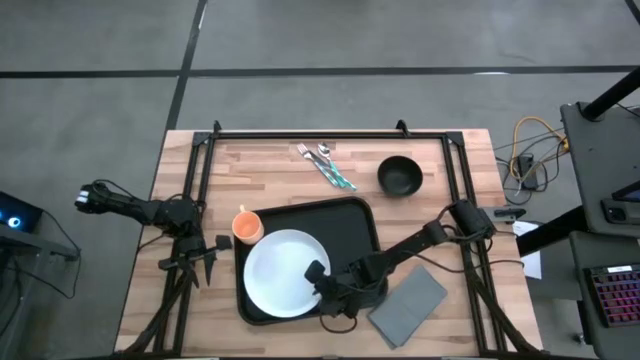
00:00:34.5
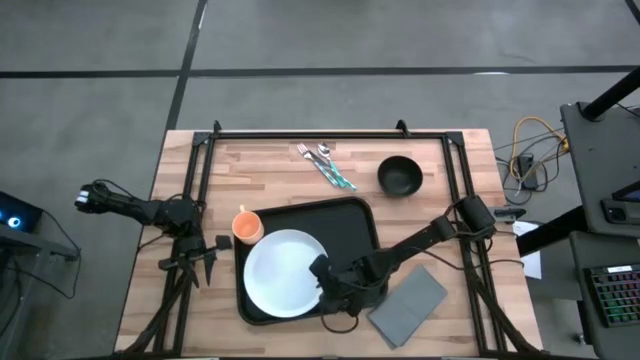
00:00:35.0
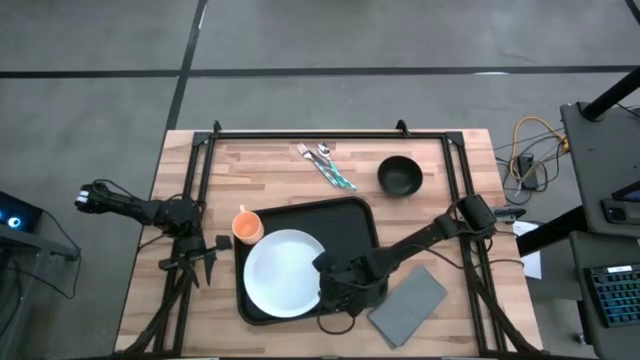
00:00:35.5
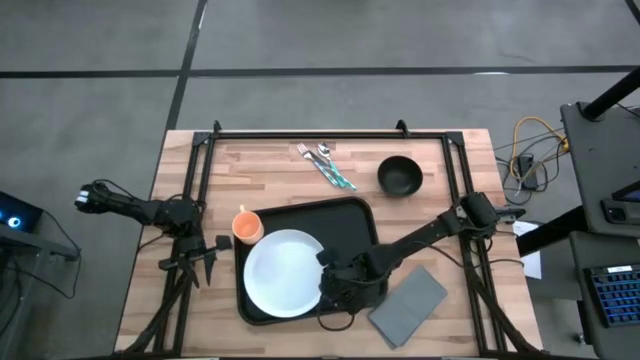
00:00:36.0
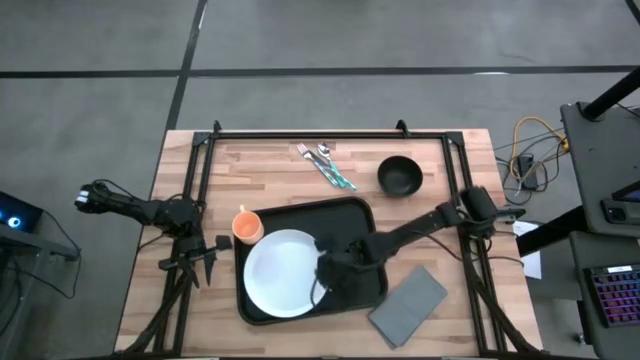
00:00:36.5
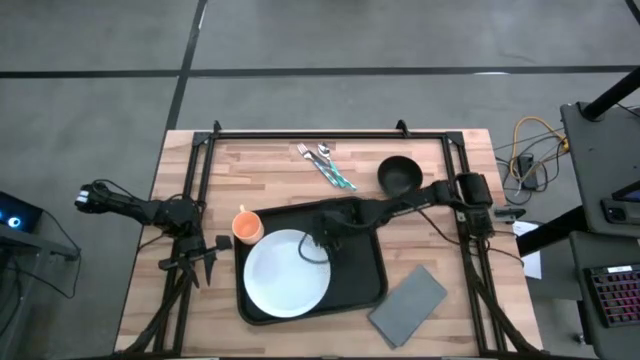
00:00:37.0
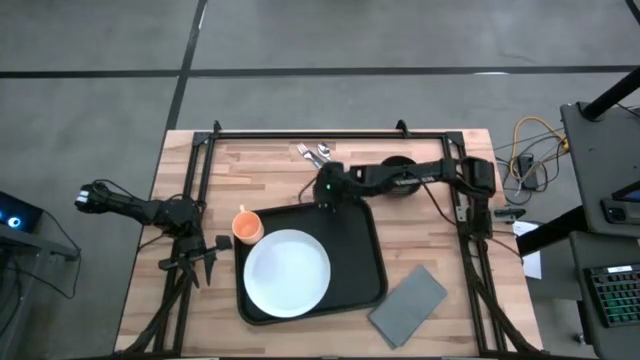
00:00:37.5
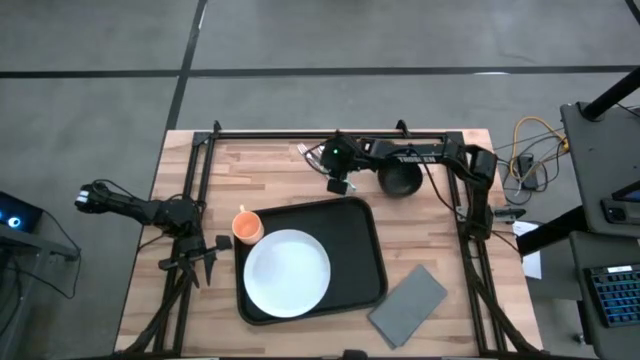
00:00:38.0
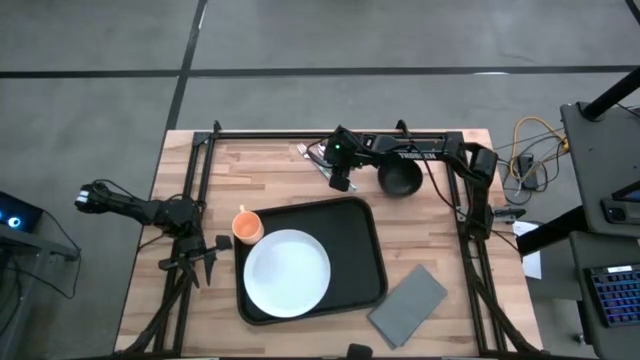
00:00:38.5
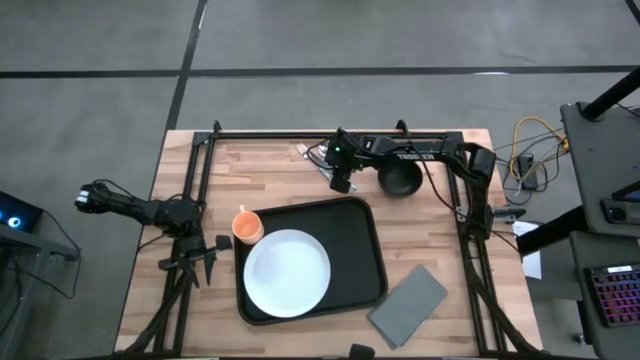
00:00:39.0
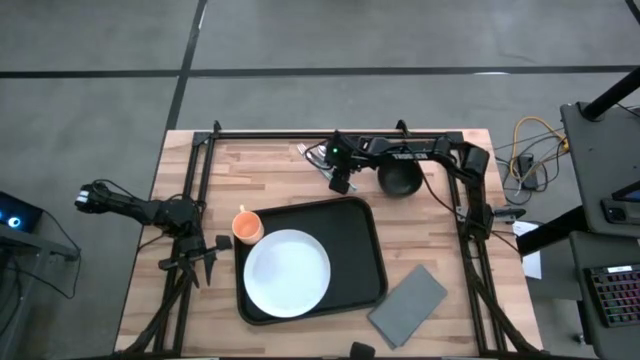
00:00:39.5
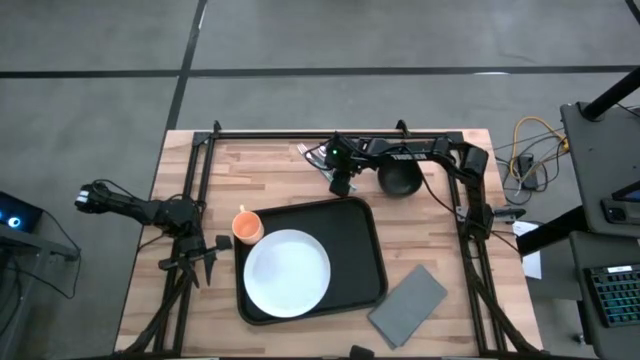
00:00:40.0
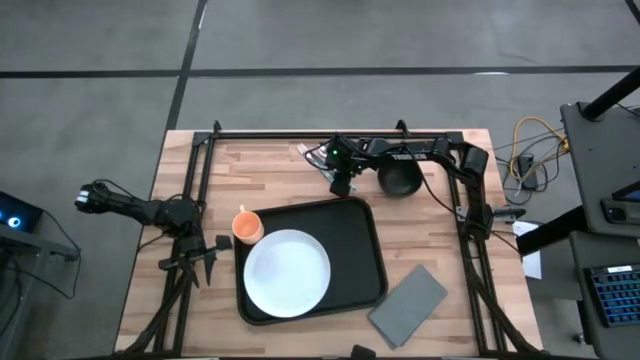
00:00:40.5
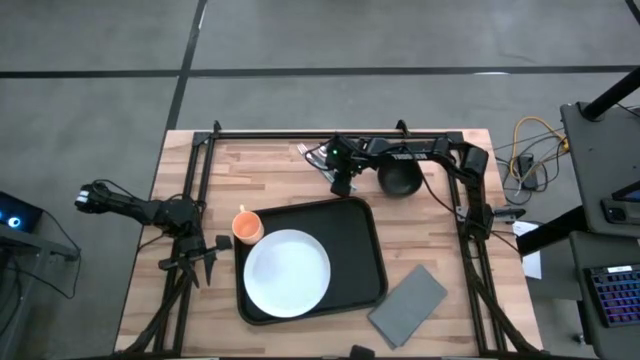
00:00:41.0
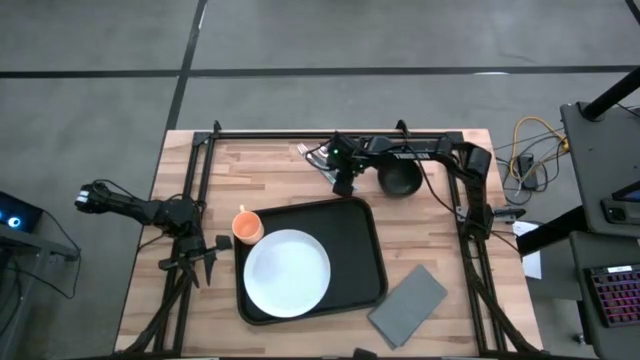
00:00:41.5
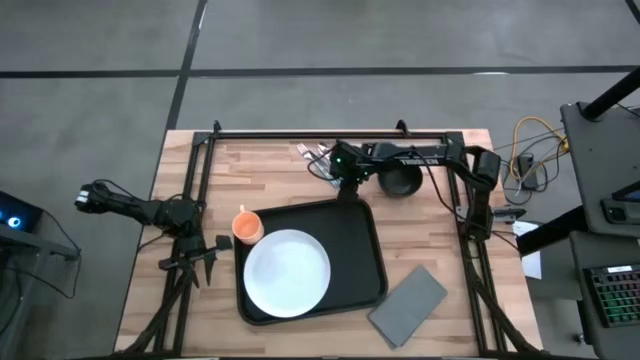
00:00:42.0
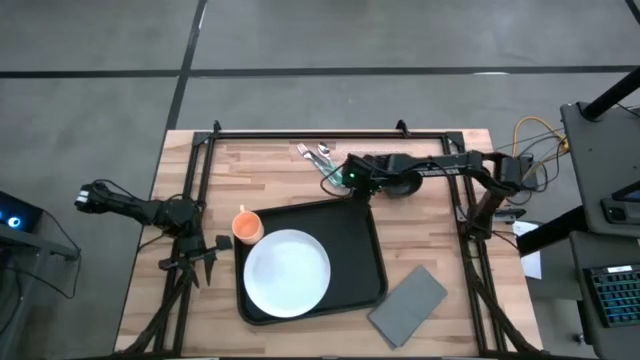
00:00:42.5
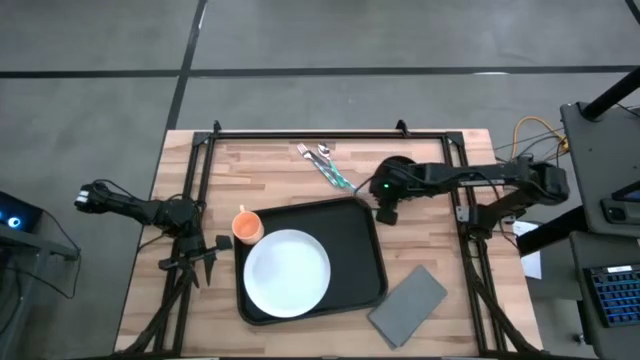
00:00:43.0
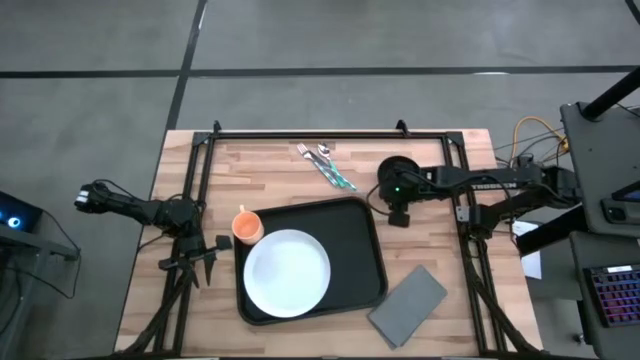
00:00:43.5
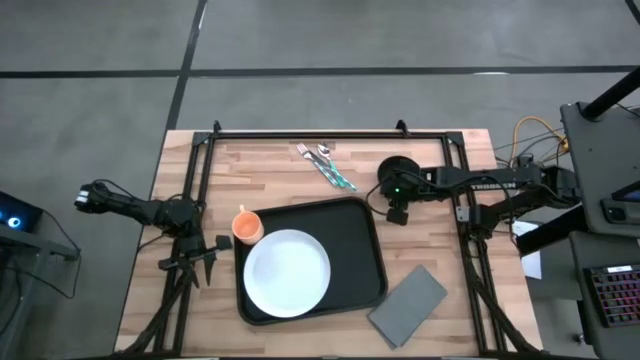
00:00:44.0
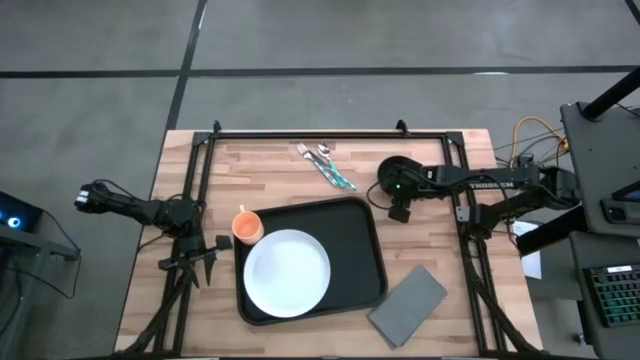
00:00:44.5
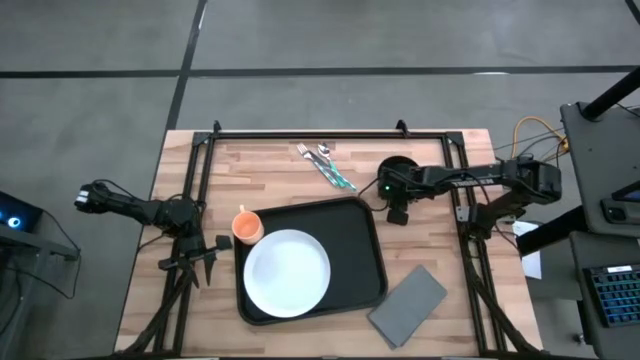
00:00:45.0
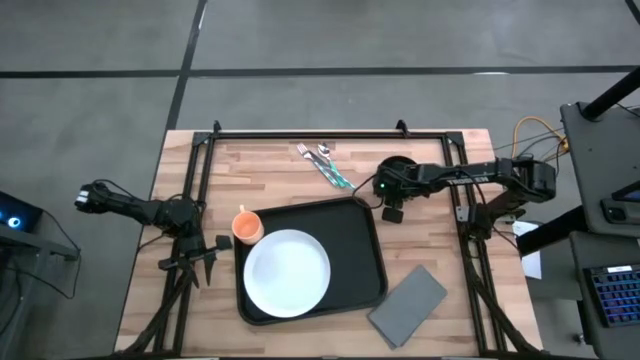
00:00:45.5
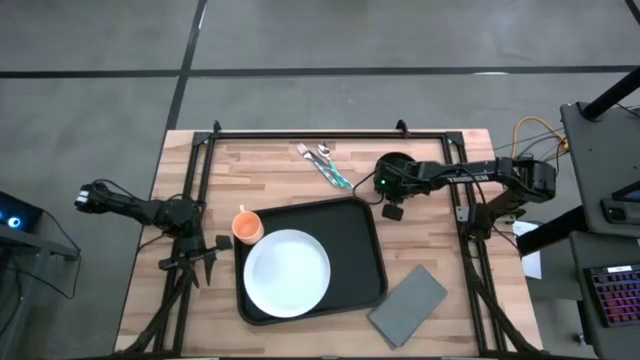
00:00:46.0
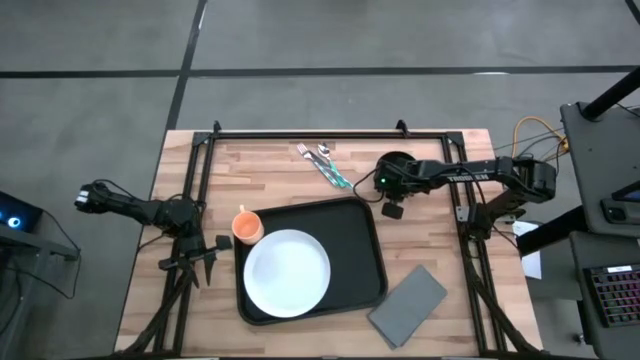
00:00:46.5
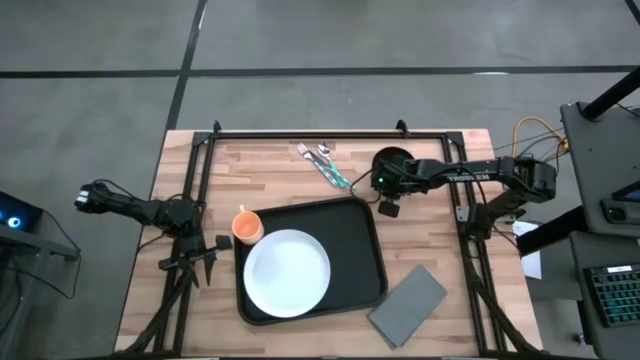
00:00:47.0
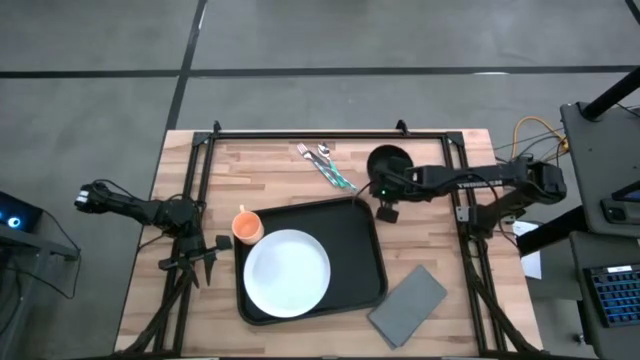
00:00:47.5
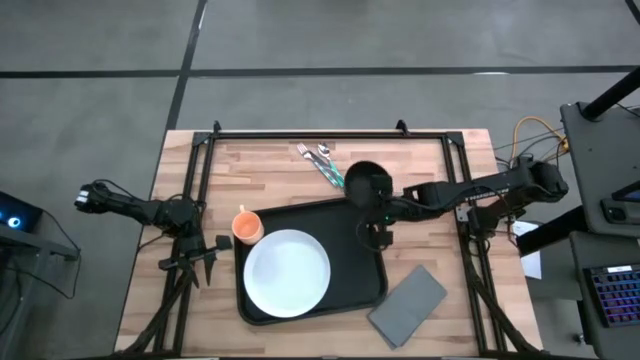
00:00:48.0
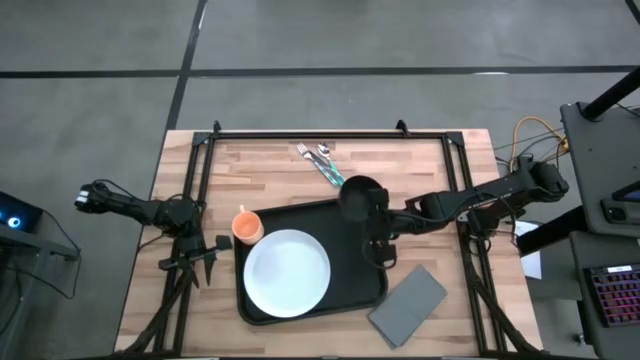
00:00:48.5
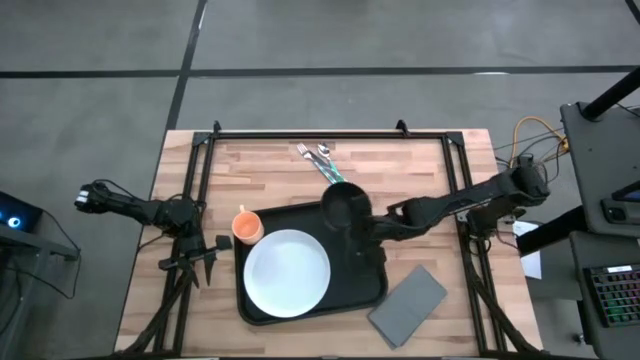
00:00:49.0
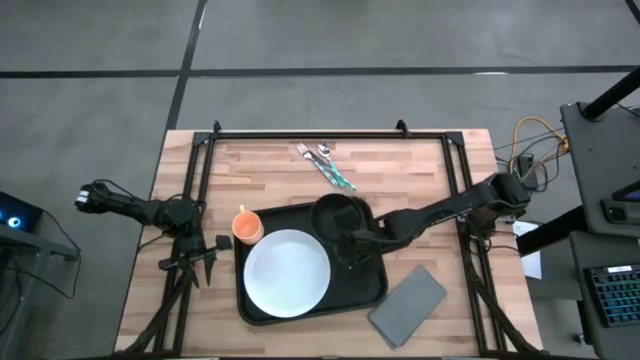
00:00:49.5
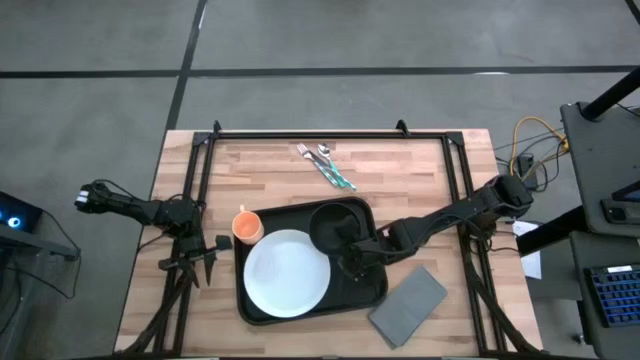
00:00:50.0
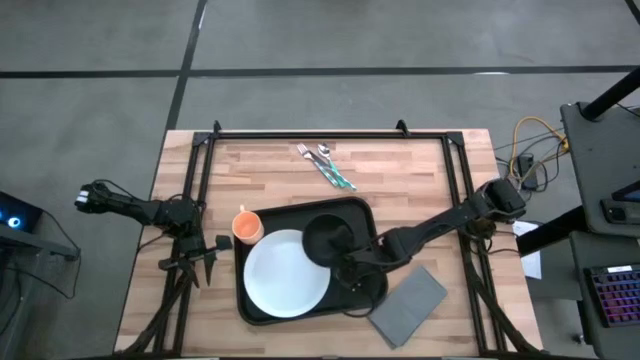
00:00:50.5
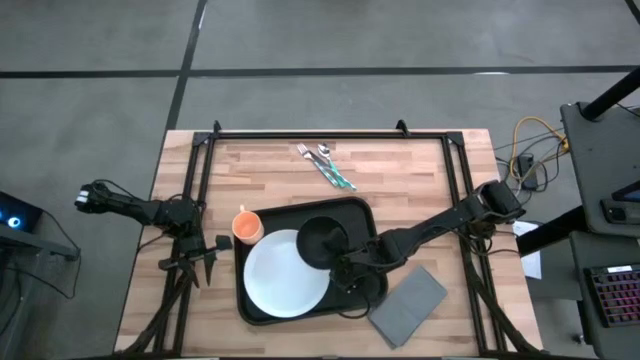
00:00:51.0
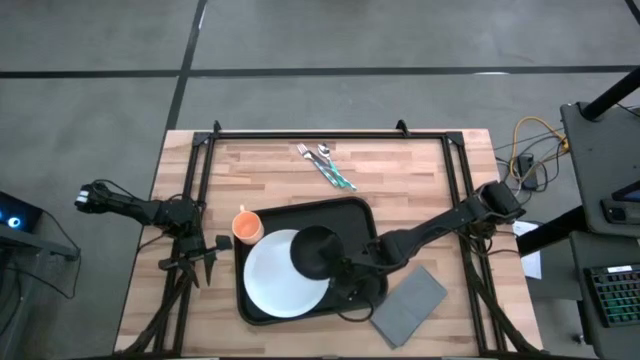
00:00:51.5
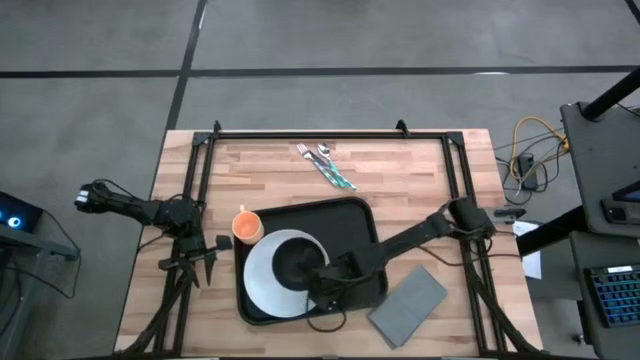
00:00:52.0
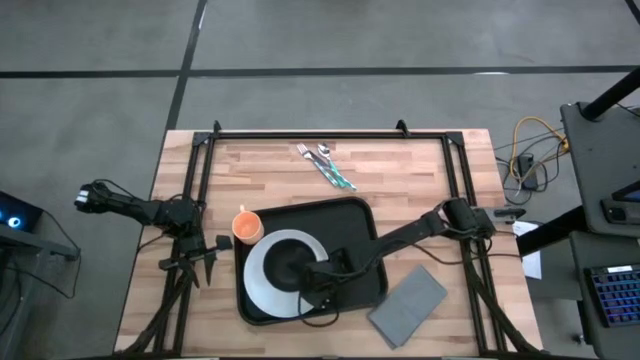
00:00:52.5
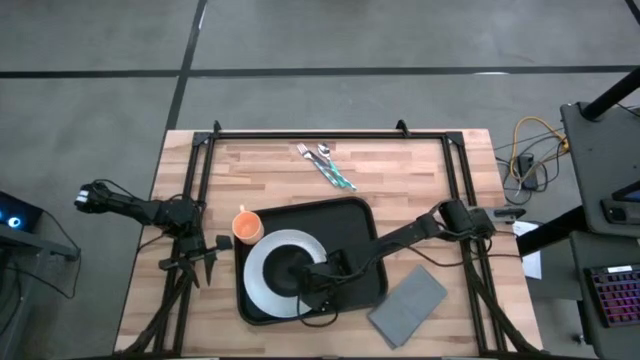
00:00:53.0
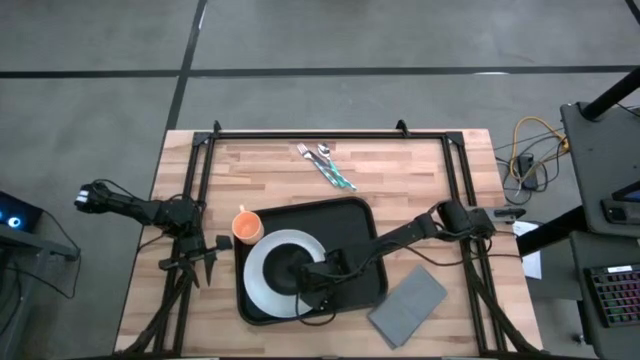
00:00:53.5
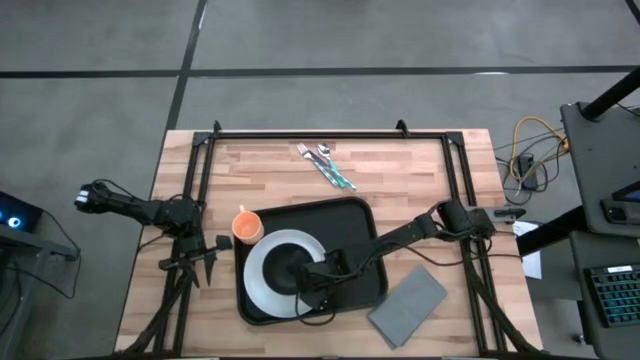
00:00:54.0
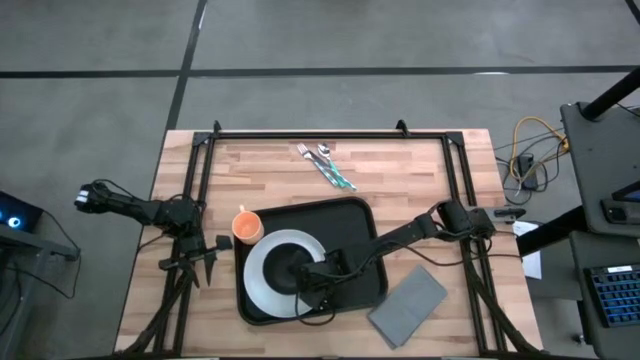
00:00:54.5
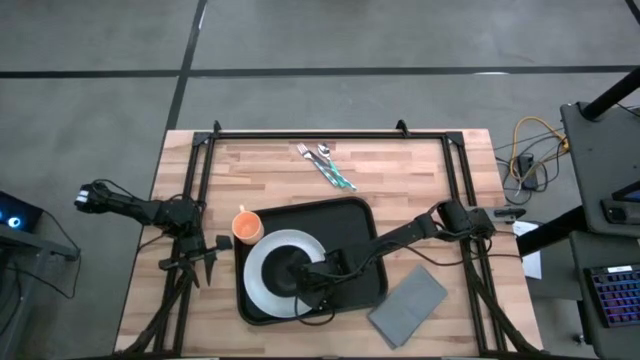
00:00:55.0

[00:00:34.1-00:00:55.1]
Task: Set up tray
Put the black bowl on the white plate
